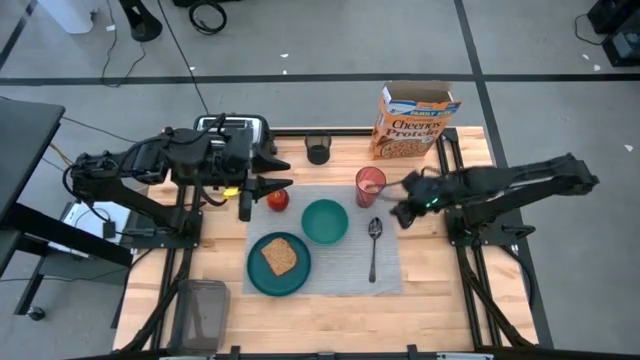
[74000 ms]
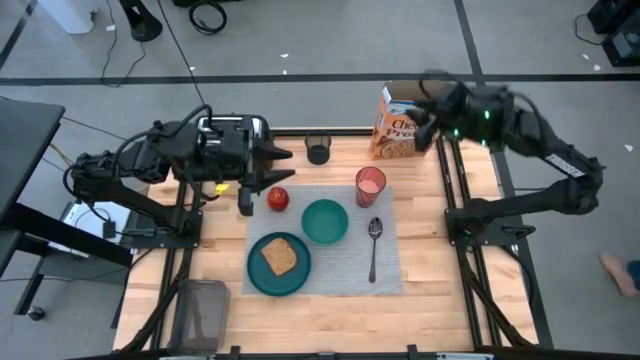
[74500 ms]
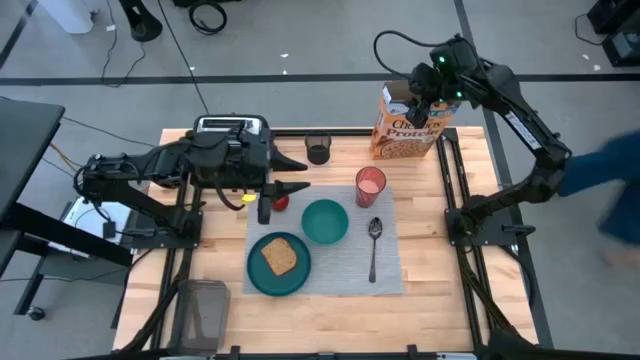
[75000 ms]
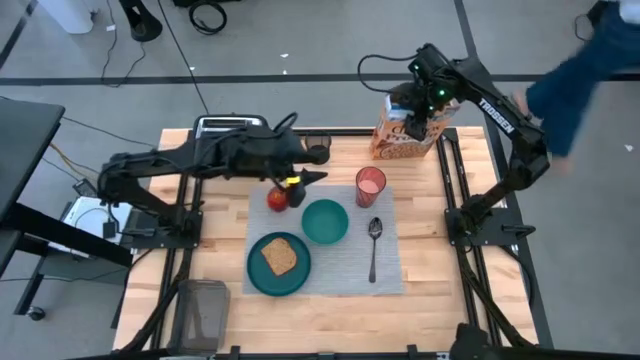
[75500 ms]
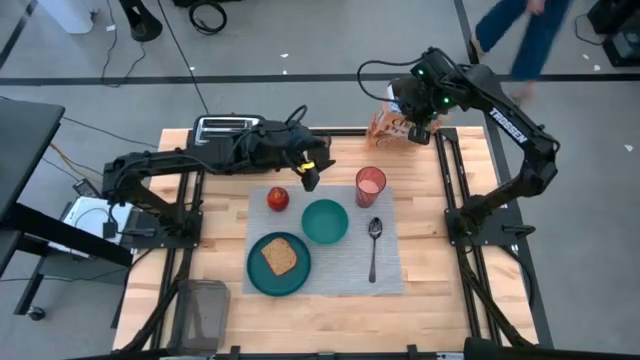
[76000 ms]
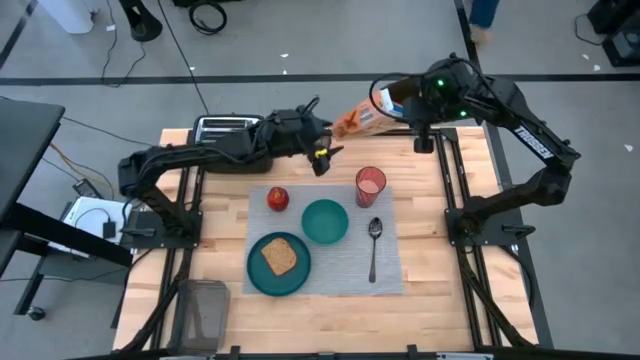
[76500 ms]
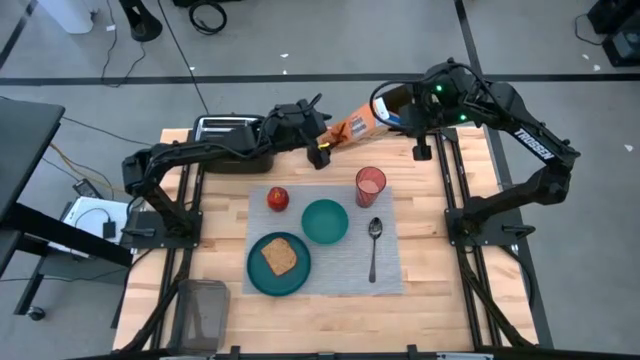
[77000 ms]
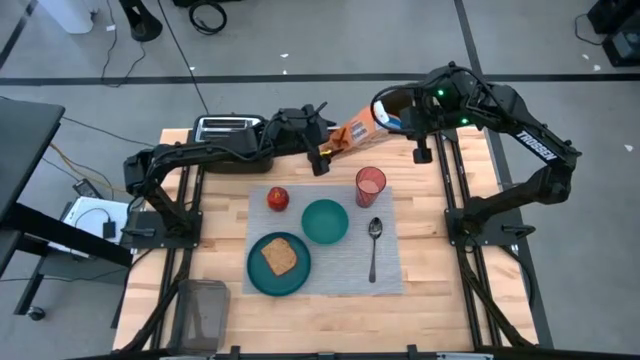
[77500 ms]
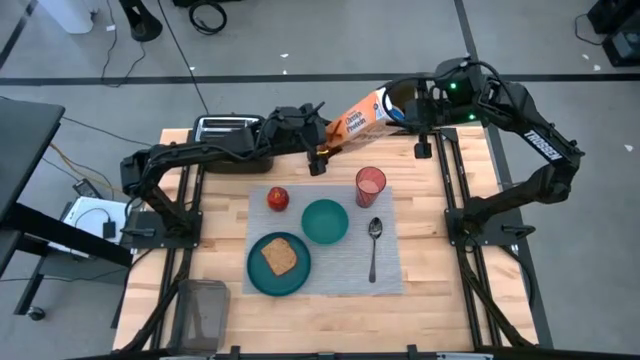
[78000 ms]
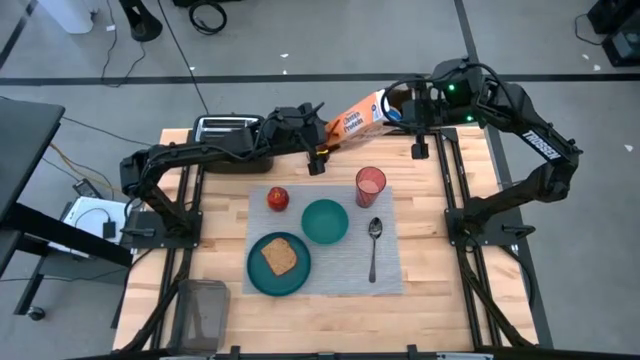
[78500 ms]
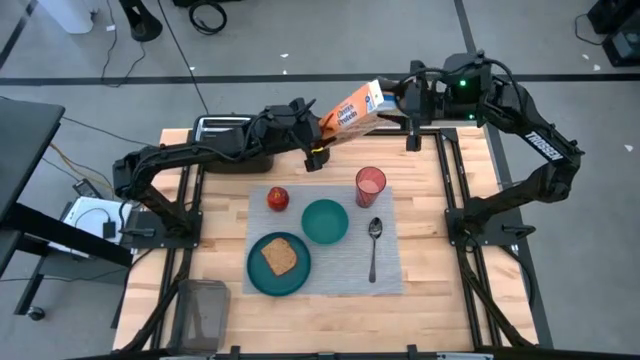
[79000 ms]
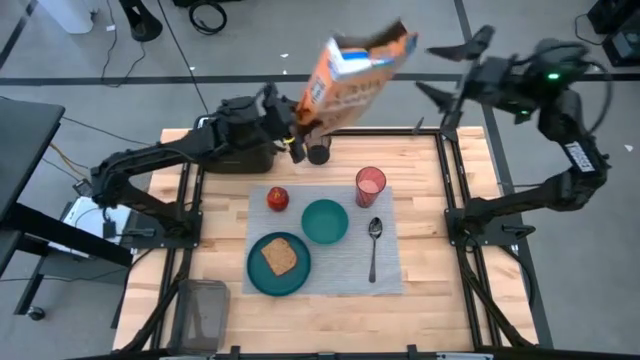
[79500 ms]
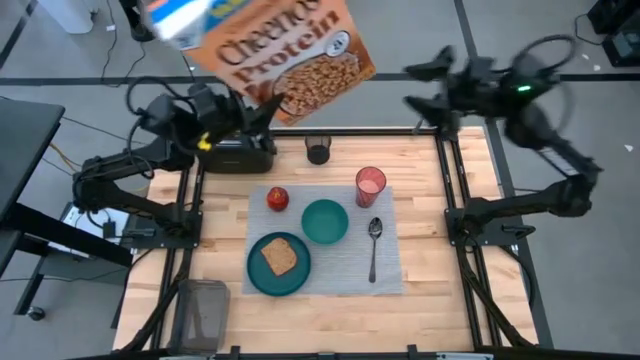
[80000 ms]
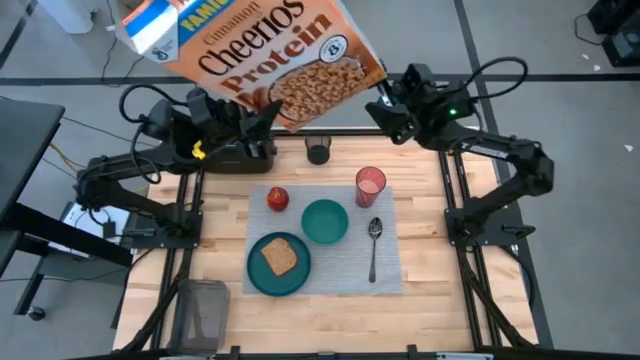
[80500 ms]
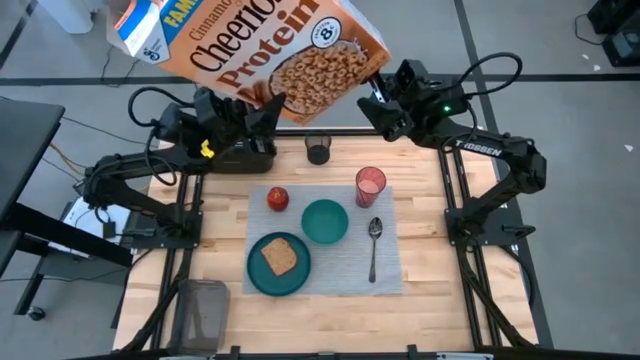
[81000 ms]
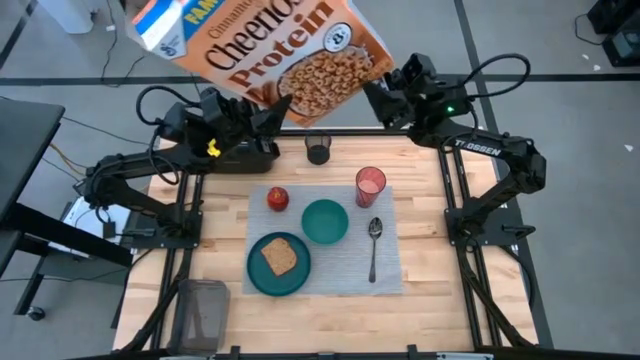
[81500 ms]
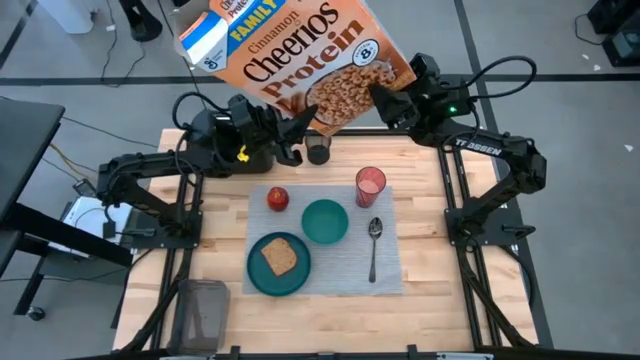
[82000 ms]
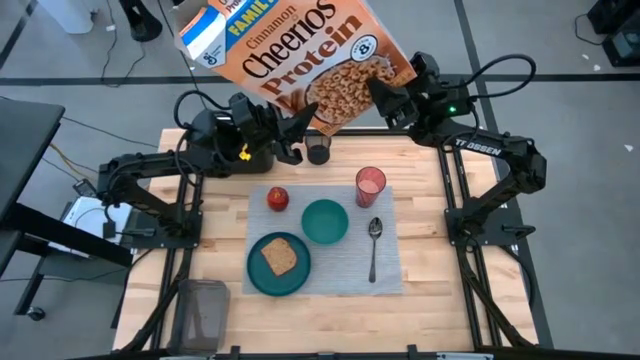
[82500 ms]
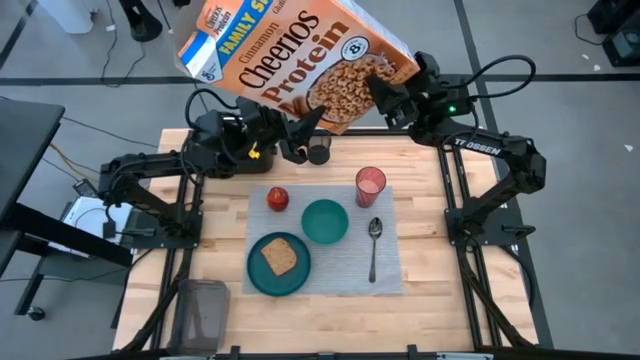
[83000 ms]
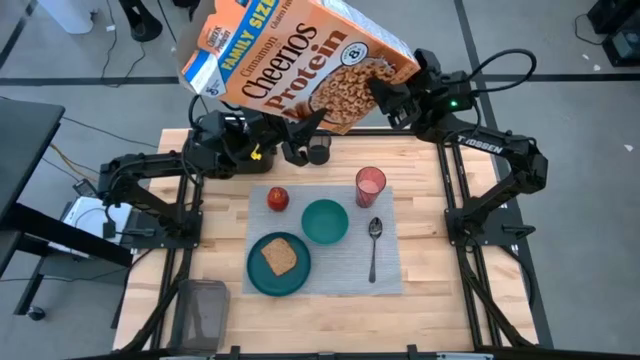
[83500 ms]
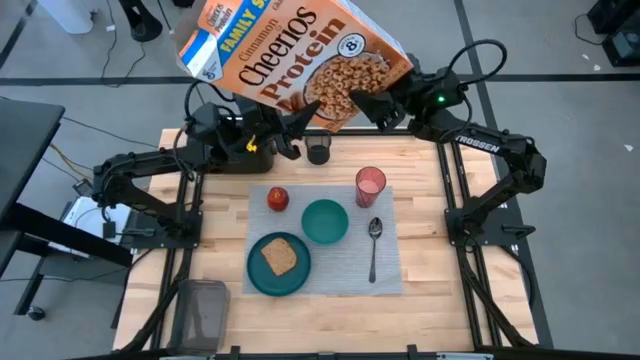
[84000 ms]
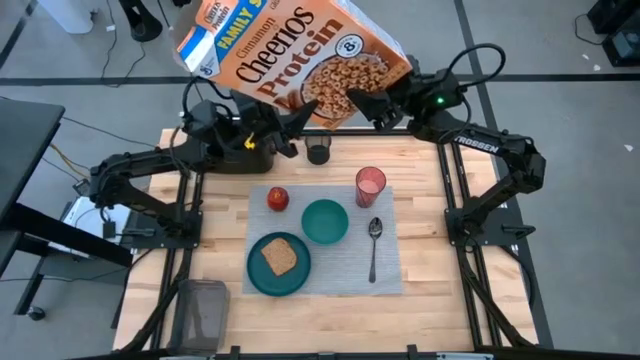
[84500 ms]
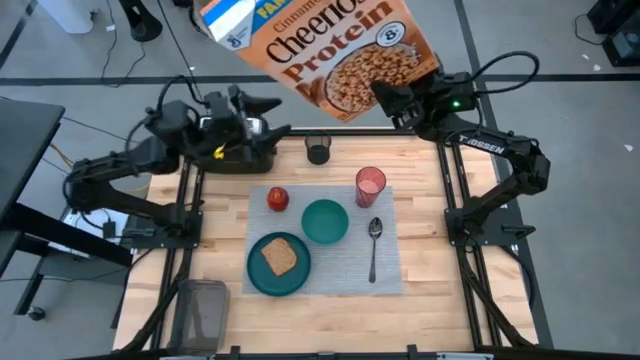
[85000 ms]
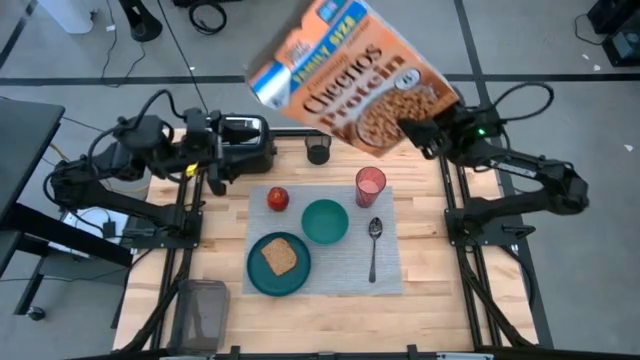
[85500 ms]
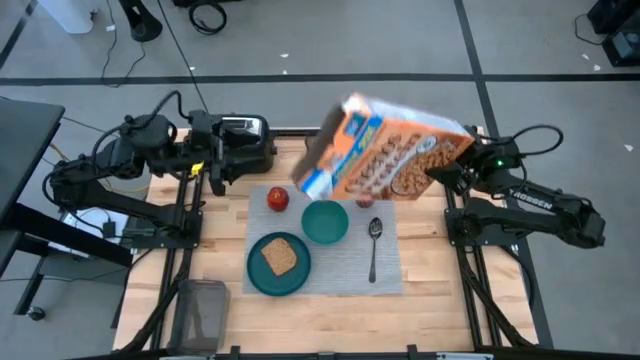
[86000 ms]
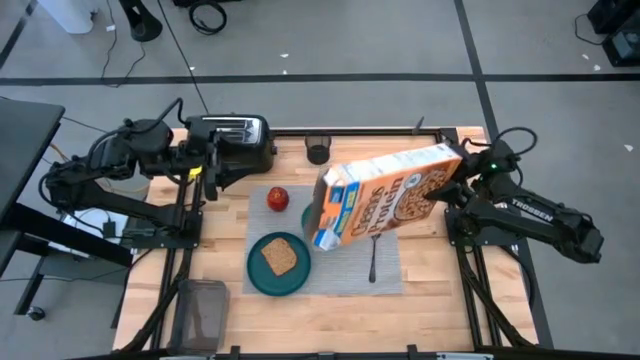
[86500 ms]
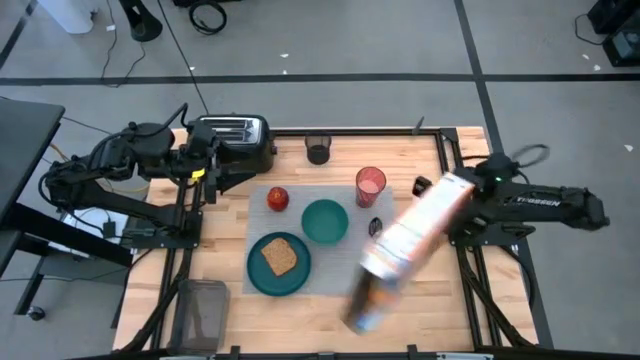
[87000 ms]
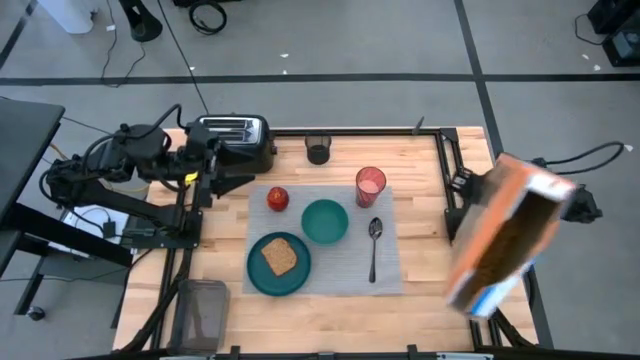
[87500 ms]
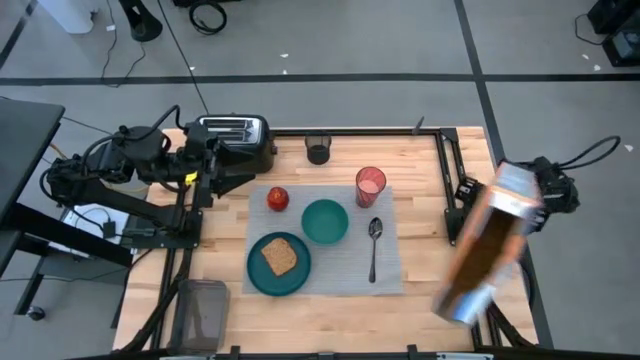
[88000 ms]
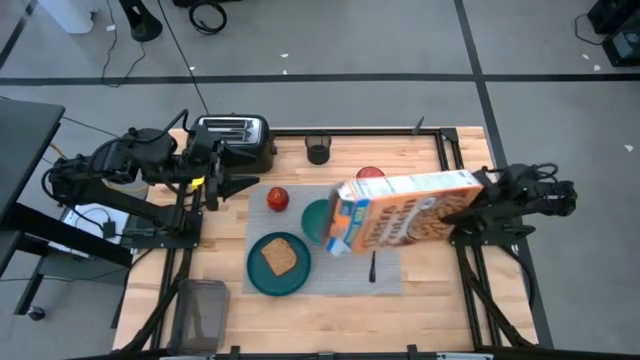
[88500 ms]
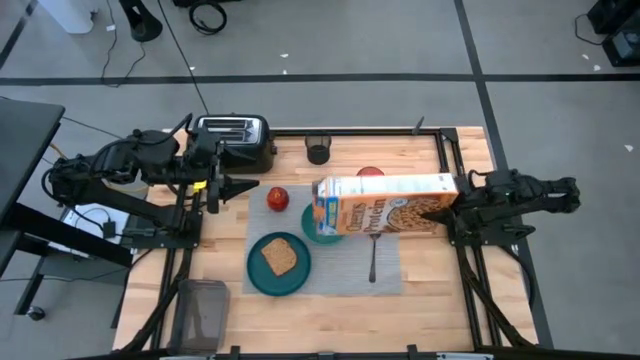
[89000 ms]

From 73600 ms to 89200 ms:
Task: Arrange a breakfast setting
Pour the cereal from the orange cereal box into the dark green bowl
